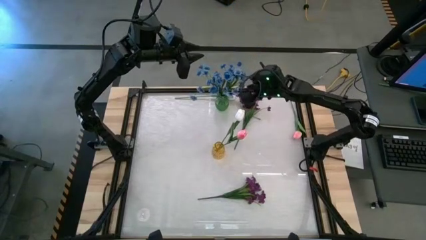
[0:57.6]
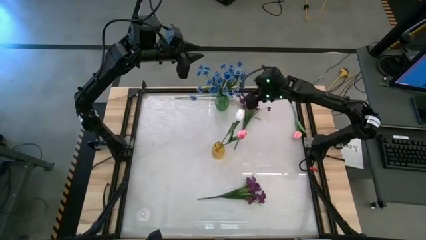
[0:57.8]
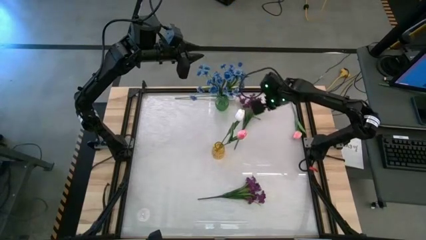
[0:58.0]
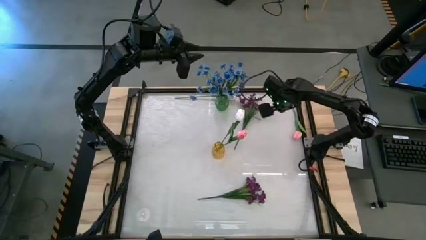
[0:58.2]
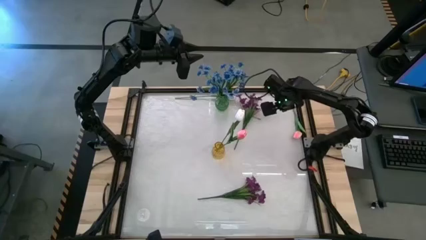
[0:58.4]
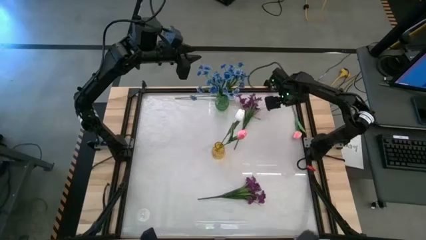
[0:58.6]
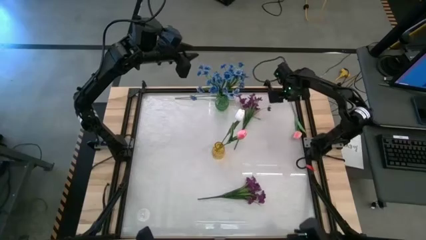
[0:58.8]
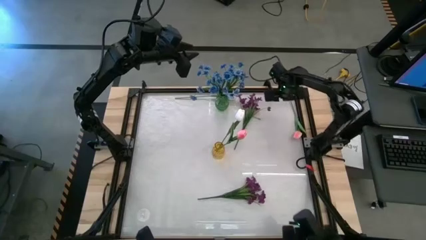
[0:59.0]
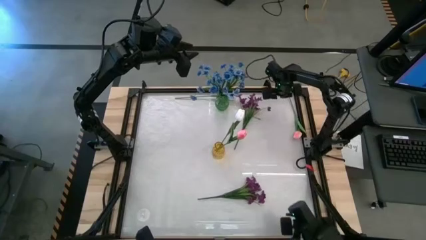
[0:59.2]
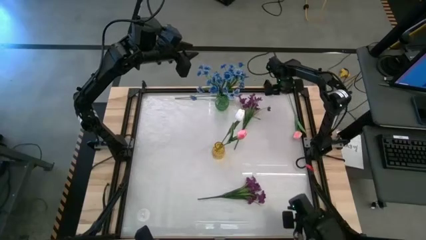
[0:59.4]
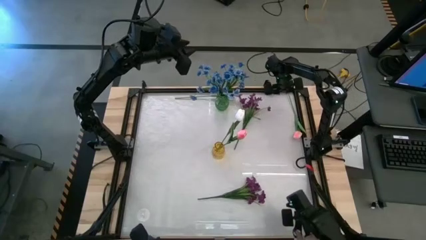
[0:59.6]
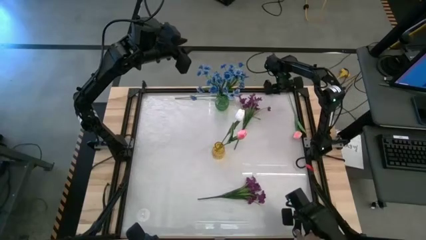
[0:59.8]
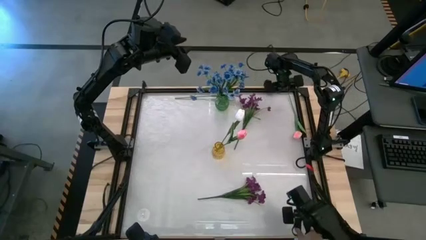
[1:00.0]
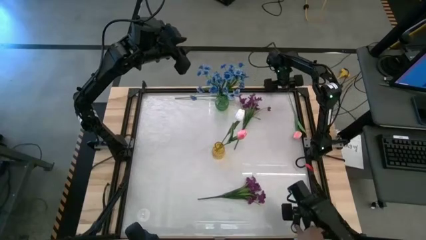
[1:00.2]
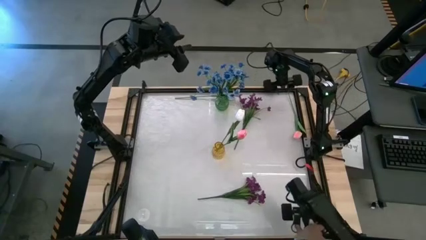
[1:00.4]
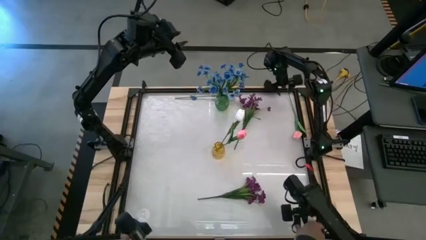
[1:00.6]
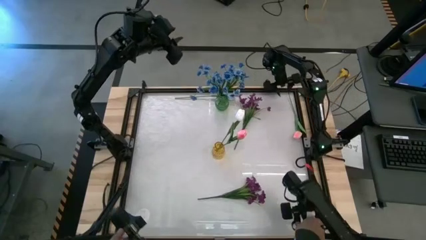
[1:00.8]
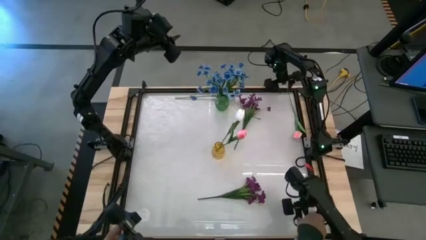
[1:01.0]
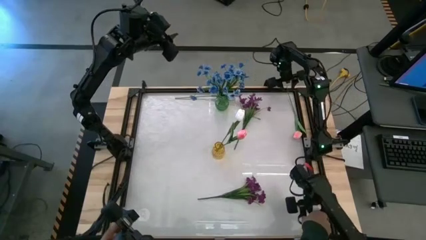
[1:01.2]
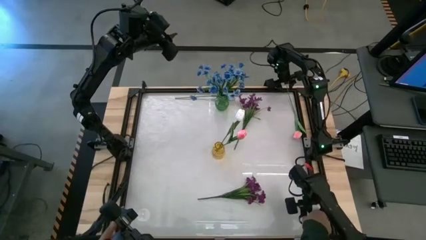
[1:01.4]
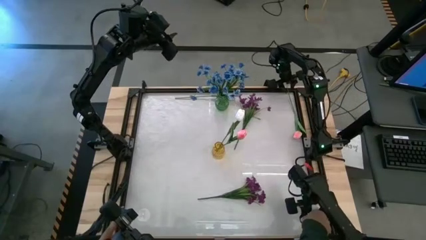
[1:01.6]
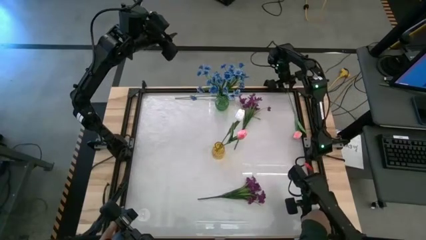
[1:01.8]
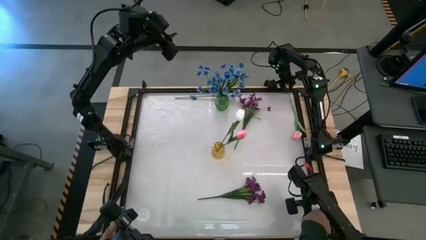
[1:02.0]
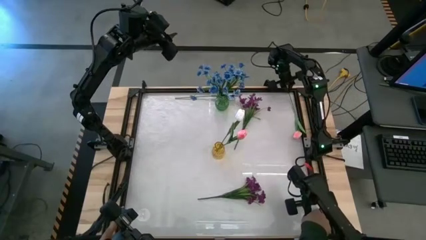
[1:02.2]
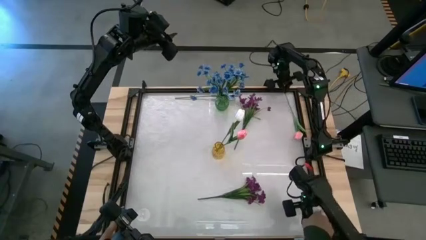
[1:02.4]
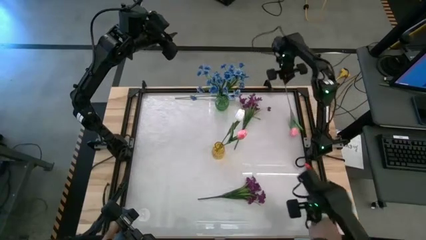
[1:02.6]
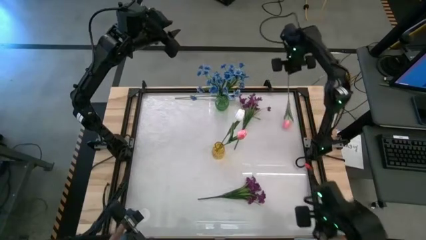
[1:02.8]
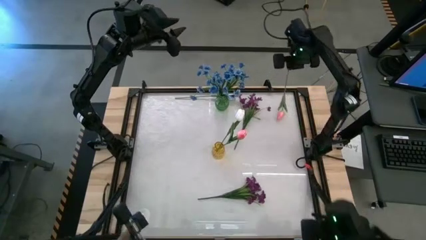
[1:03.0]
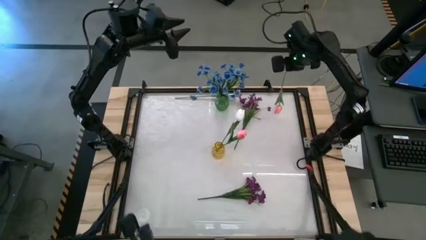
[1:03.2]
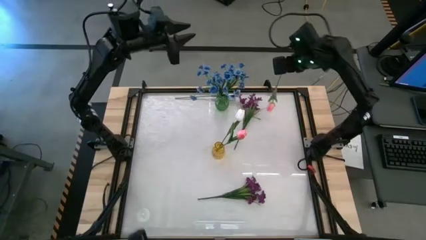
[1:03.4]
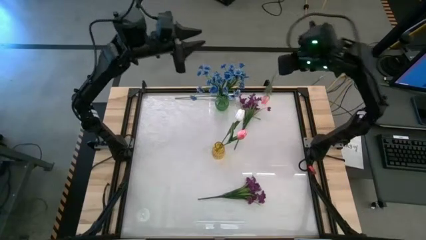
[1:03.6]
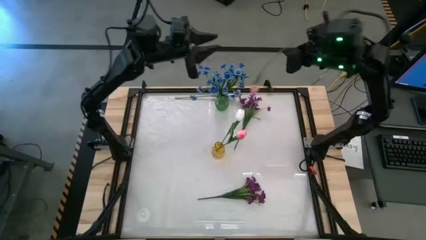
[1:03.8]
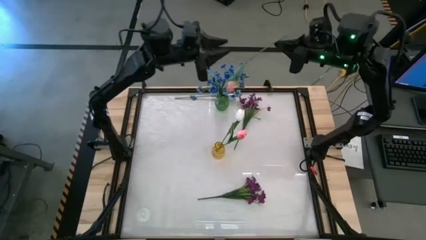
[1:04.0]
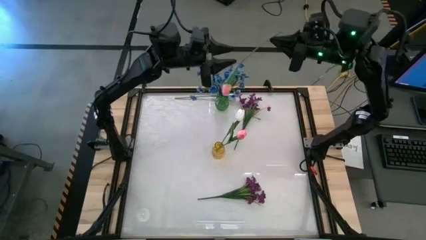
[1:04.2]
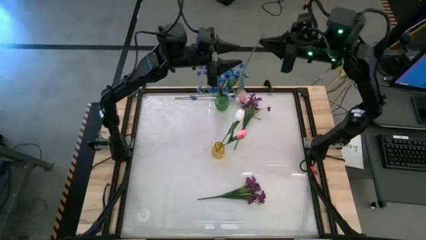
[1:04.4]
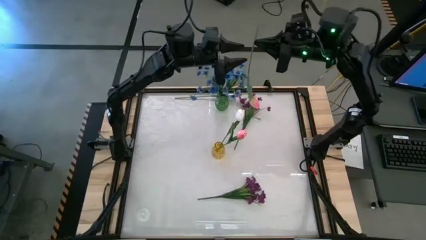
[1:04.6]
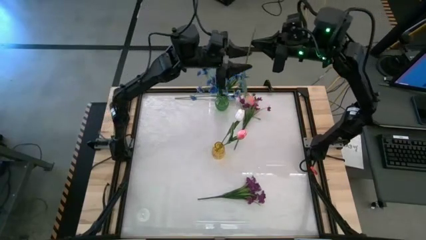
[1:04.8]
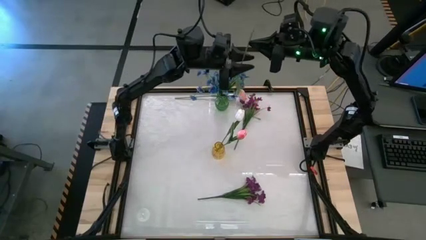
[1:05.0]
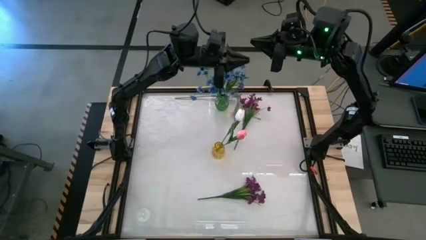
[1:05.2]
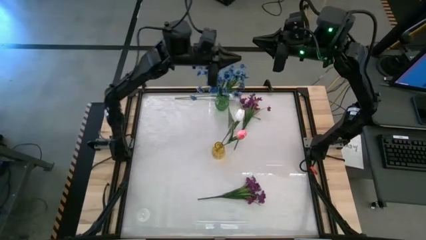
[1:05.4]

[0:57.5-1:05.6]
Task: Sort flowers into vase by color
Put the pink flower into the yellow vase

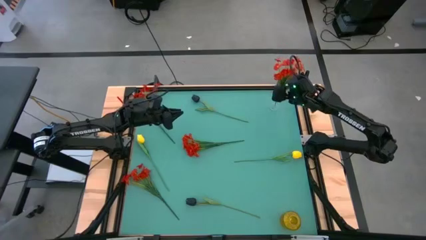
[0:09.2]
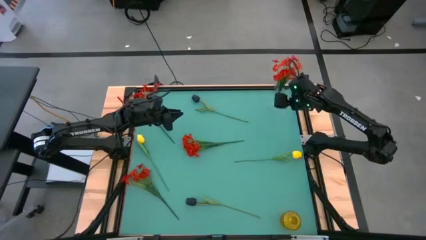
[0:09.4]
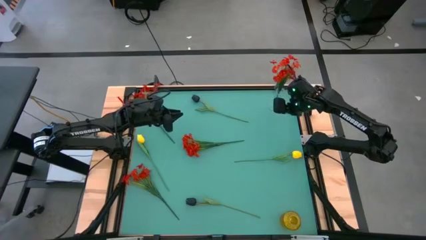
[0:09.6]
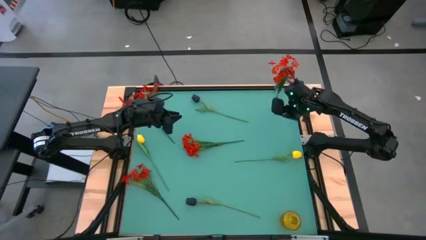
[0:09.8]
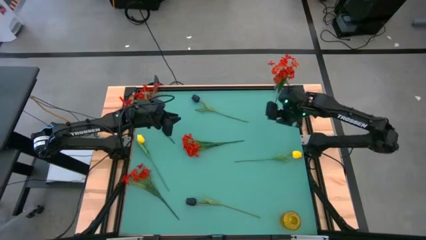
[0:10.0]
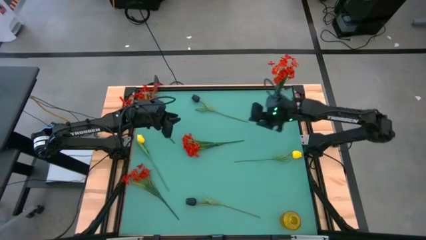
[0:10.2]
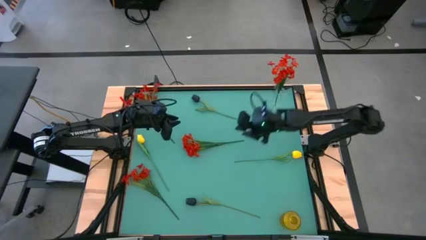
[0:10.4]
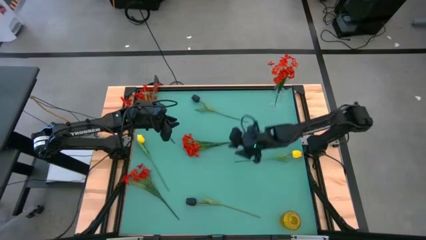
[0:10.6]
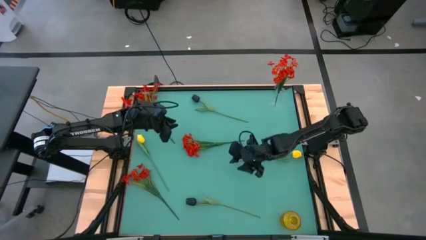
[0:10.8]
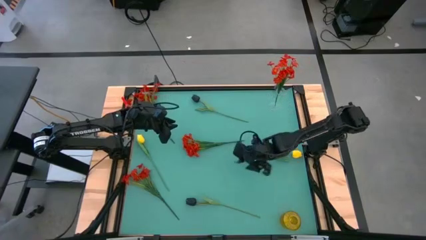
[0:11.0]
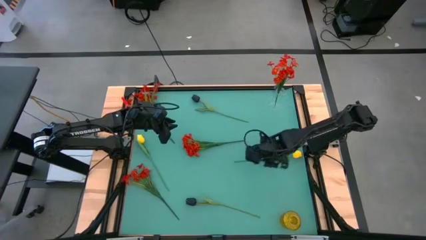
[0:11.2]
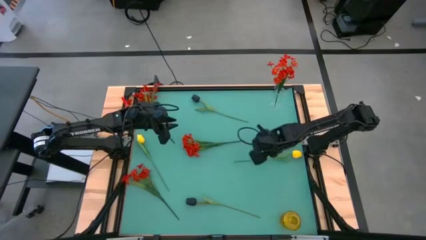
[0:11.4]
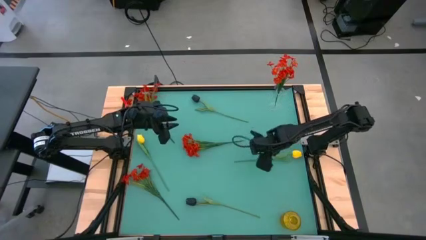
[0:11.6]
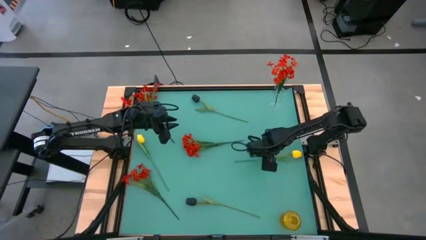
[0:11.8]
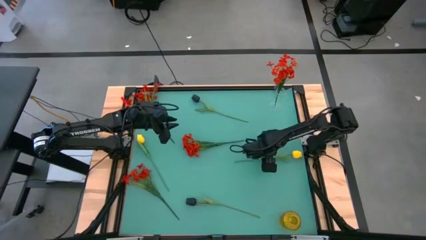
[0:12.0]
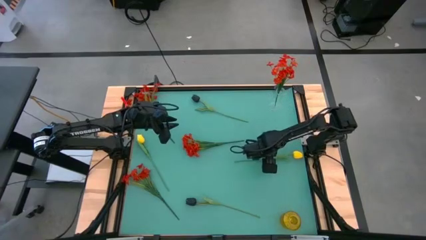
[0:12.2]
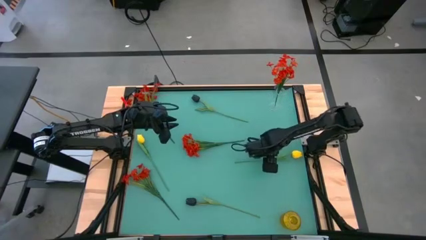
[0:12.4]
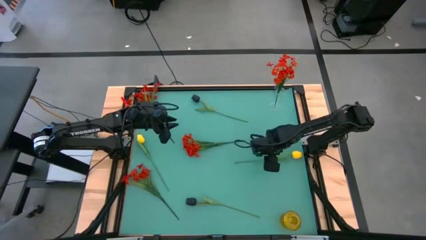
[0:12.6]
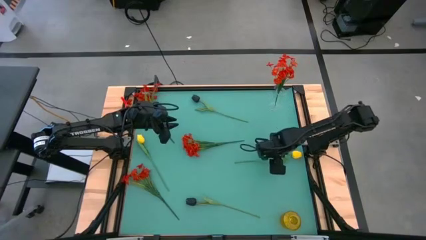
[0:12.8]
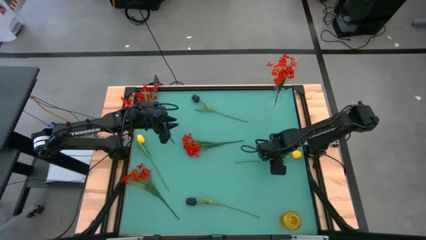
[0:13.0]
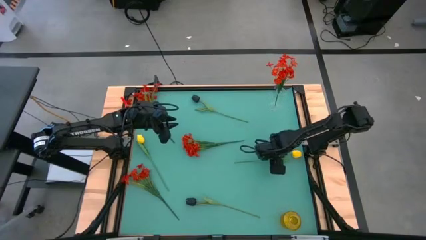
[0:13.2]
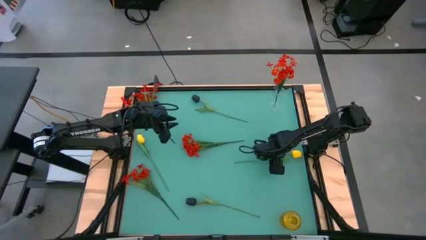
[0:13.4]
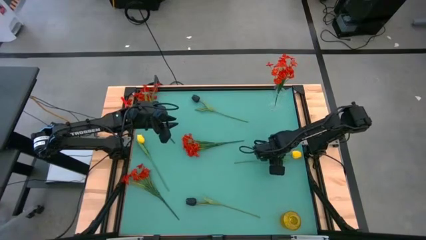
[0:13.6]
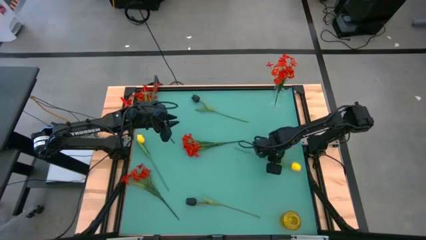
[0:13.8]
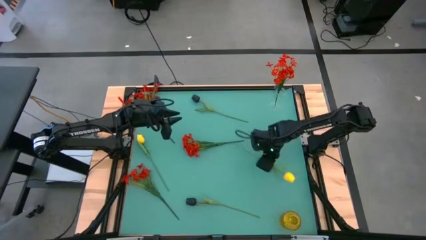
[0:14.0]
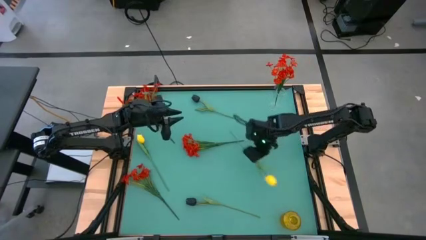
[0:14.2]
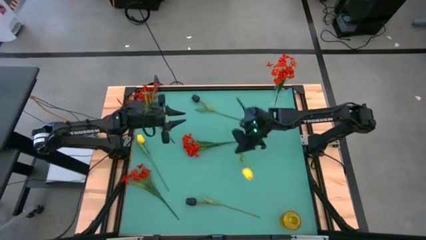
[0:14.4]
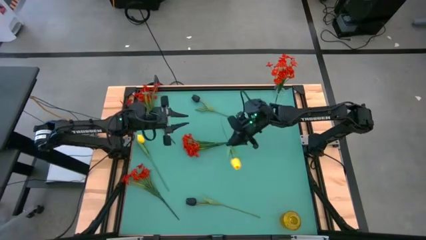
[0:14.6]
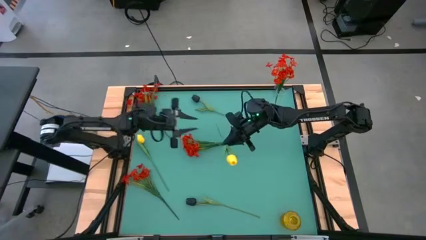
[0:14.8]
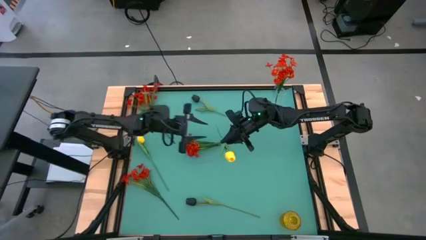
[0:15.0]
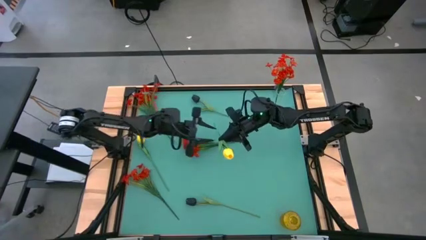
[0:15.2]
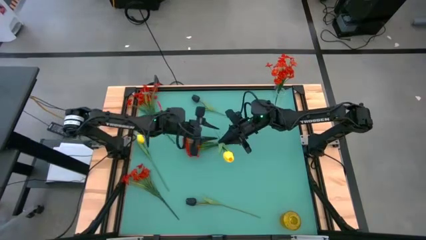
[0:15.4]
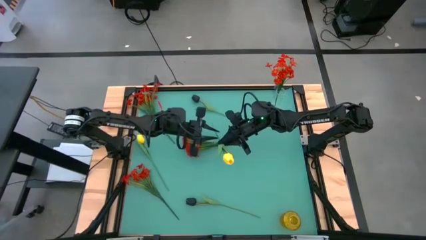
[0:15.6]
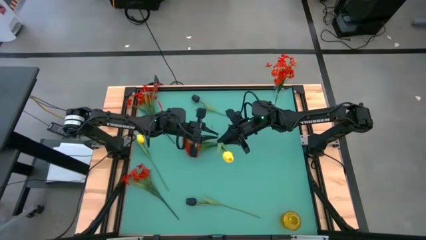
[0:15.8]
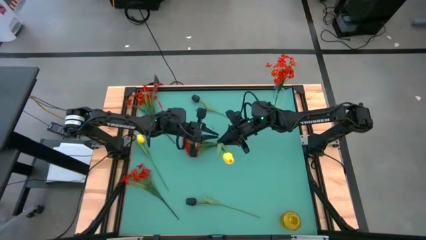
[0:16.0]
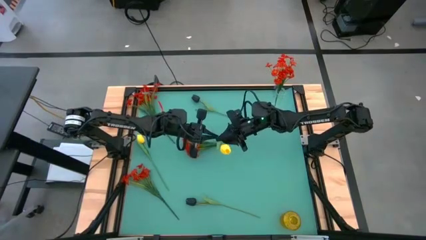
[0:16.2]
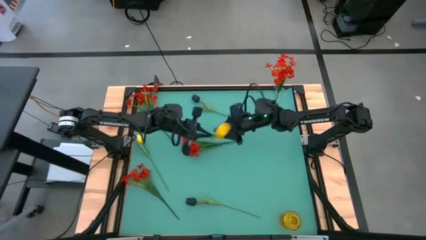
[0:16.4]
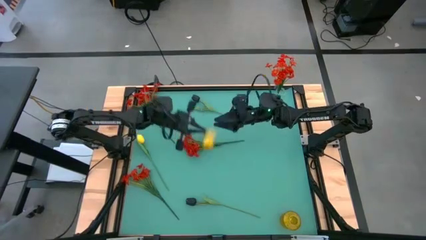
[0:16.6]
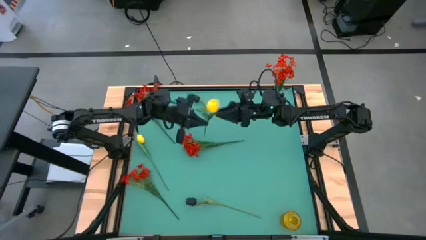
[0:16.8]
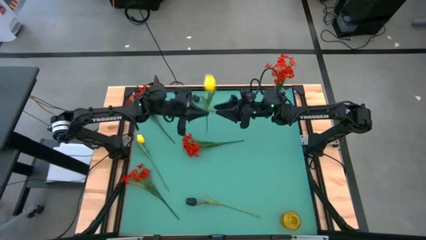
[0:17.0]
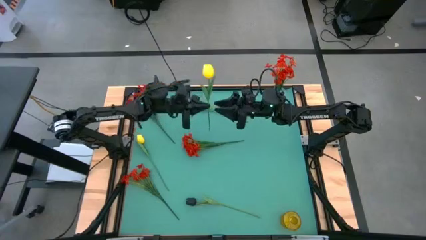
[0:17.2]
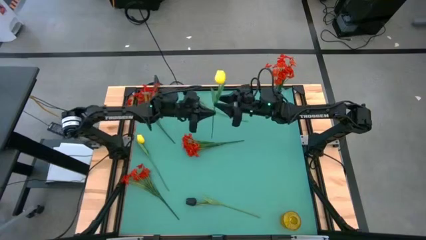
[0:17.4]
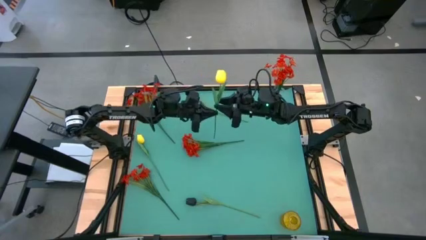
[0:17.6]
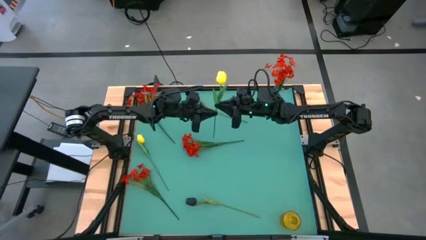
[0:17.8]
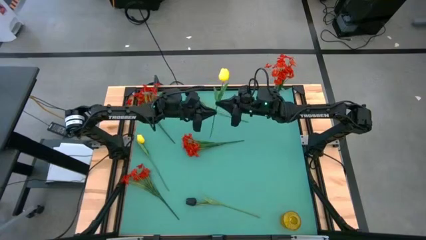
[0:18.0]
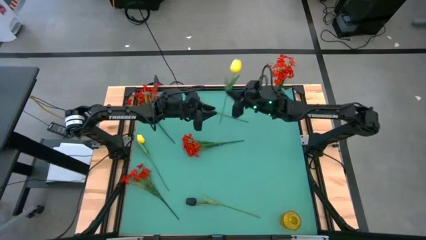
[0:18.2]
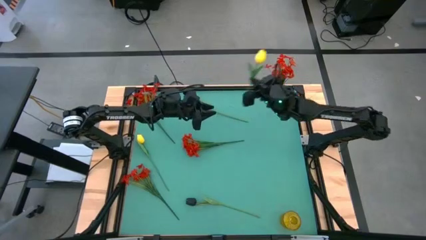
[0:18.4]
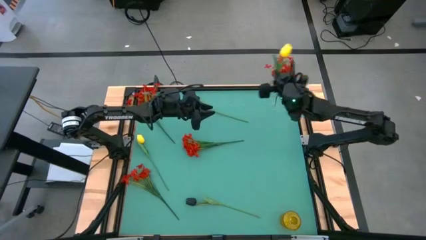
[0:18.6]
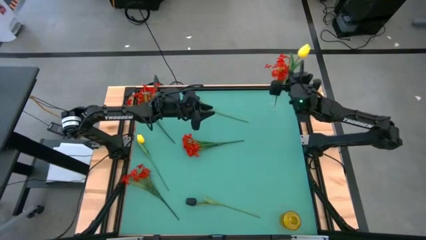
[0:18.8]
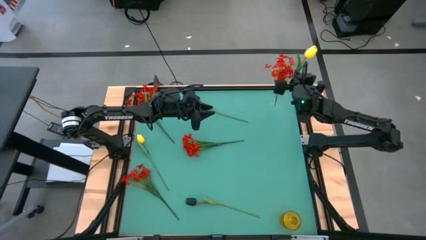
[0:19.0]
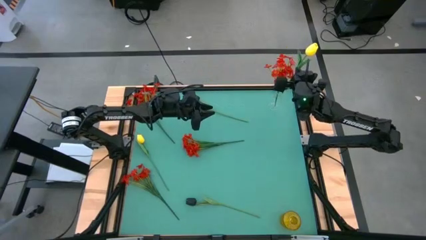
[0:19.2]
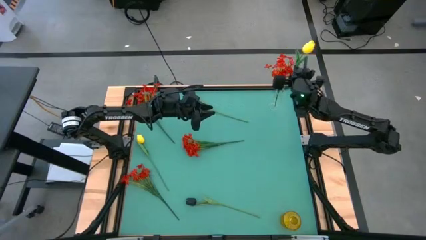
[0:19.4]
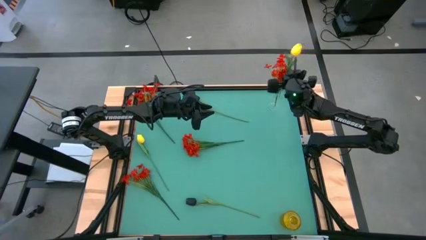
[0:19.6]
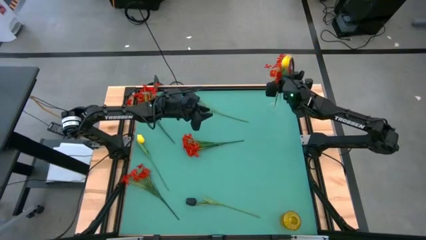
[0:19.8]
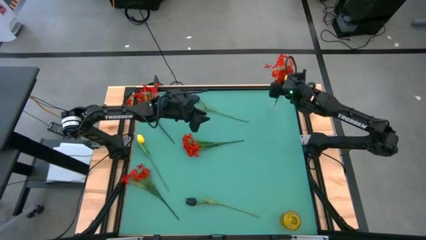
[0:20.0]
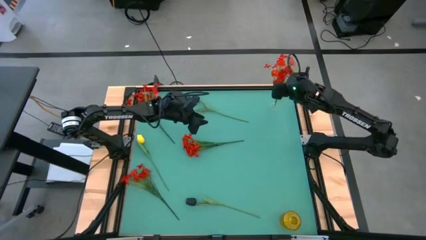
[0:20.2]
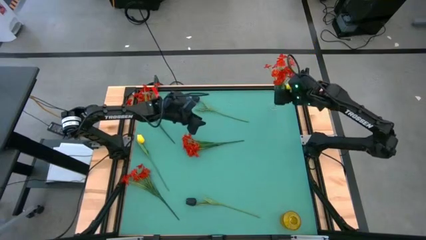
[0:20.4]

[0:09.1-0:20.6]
Task: Sort flowers into vase by color
Put the right yellow flower into the transparent vase
